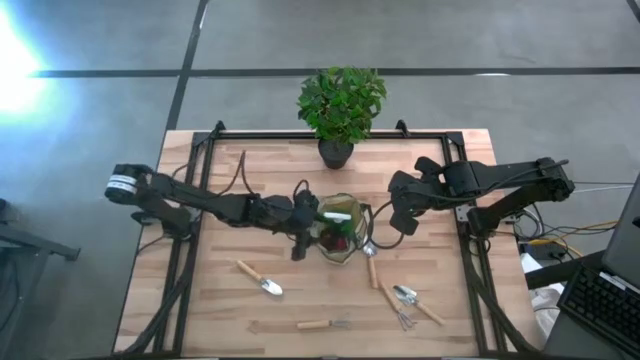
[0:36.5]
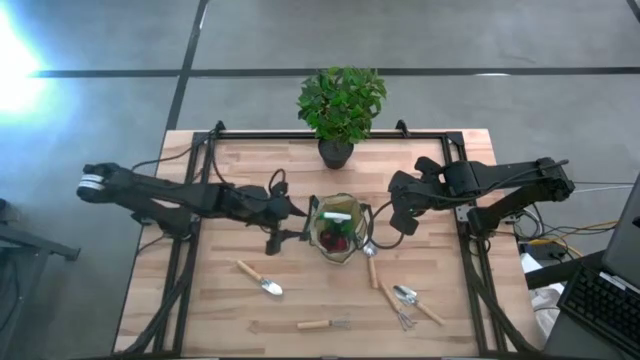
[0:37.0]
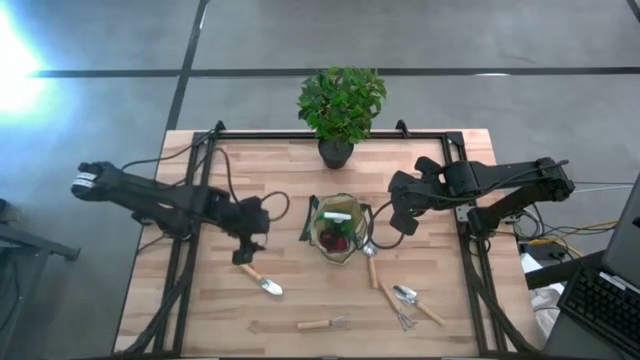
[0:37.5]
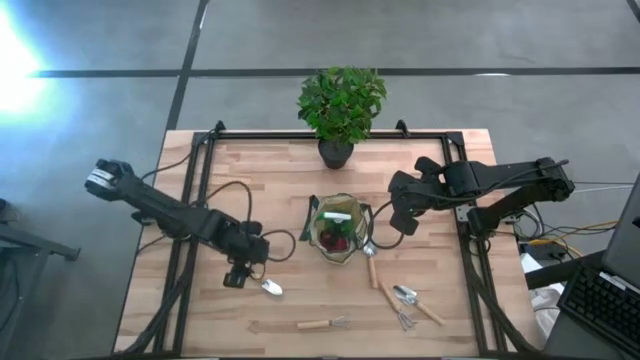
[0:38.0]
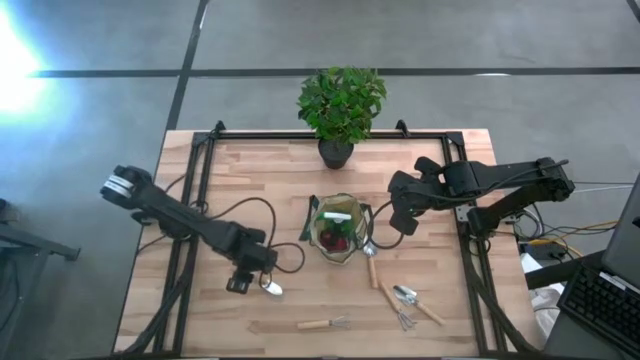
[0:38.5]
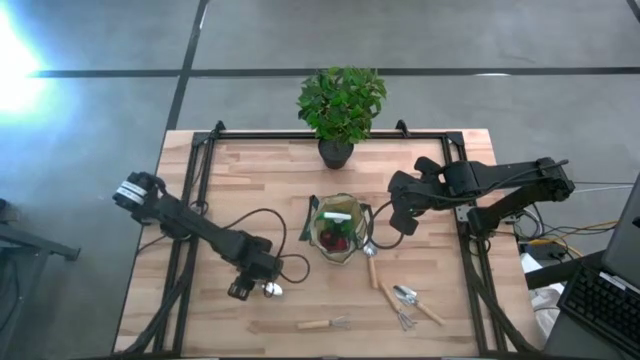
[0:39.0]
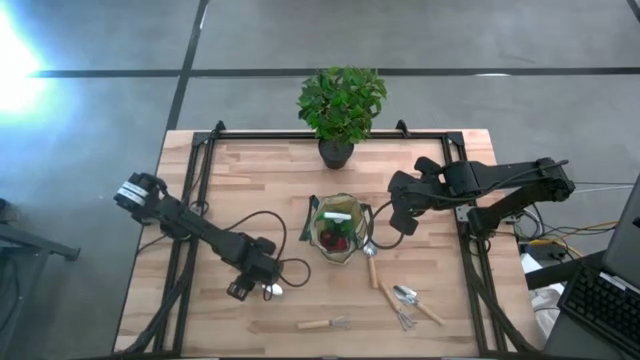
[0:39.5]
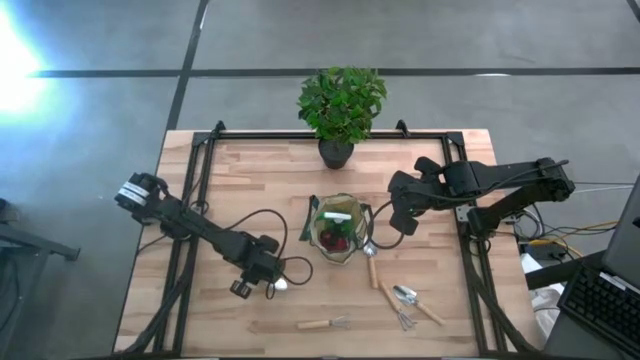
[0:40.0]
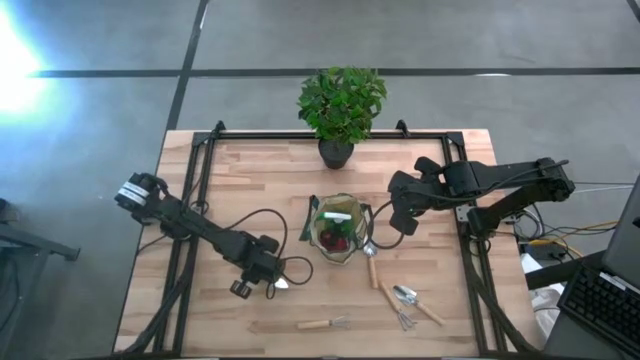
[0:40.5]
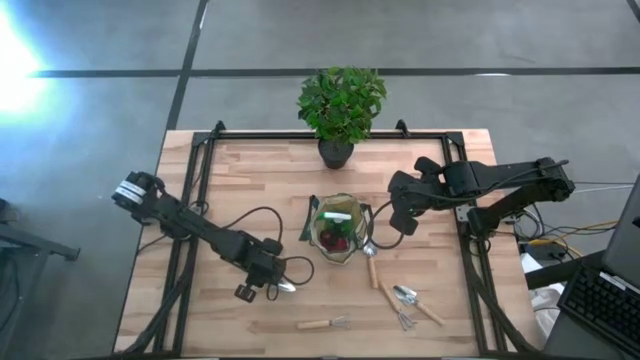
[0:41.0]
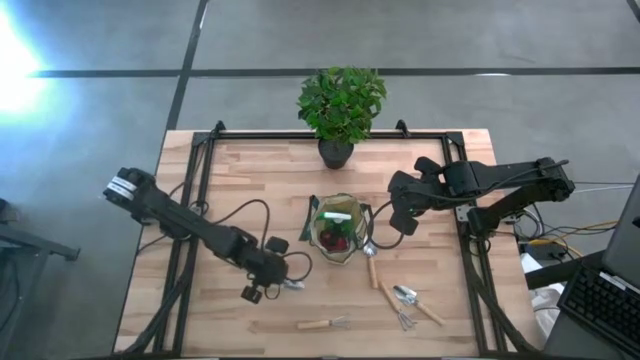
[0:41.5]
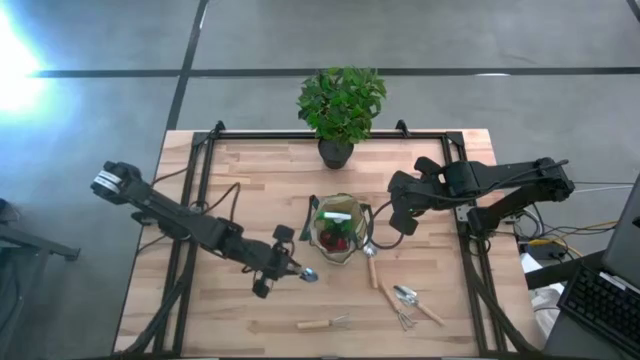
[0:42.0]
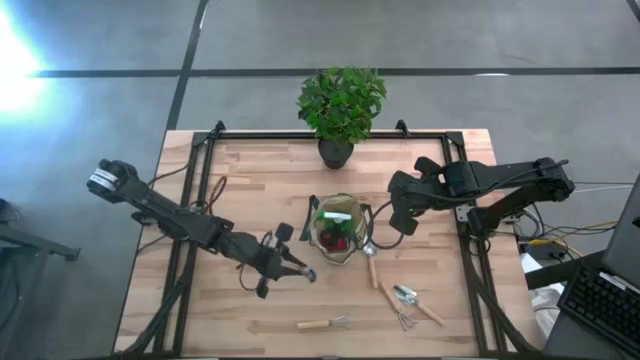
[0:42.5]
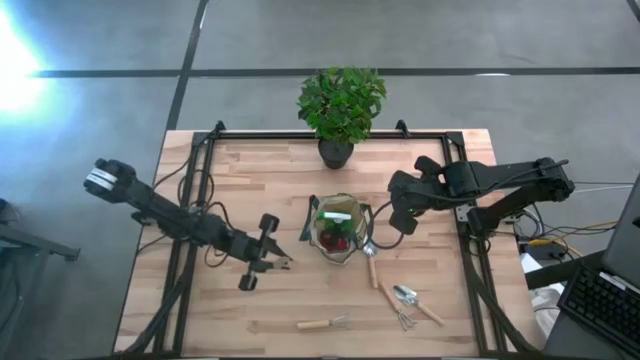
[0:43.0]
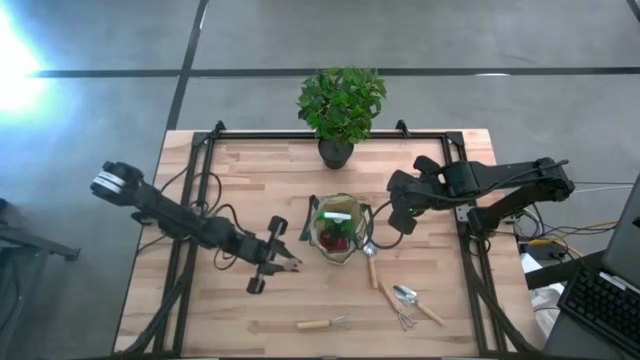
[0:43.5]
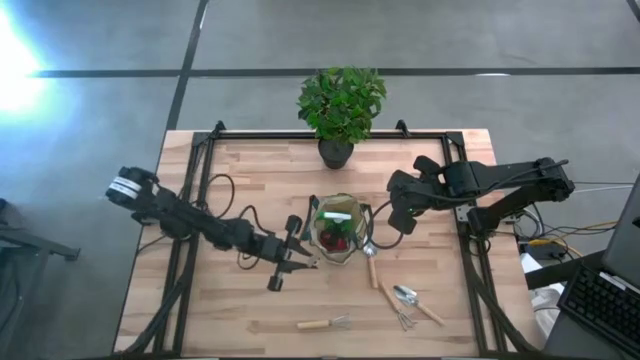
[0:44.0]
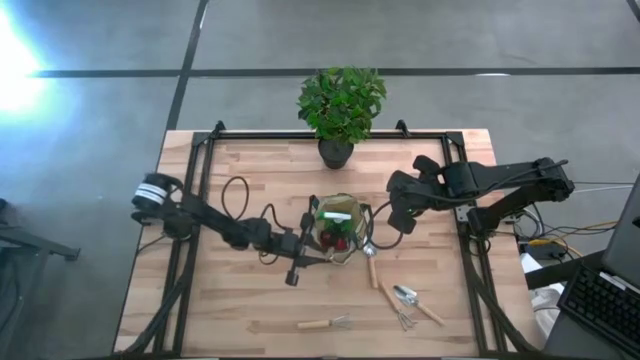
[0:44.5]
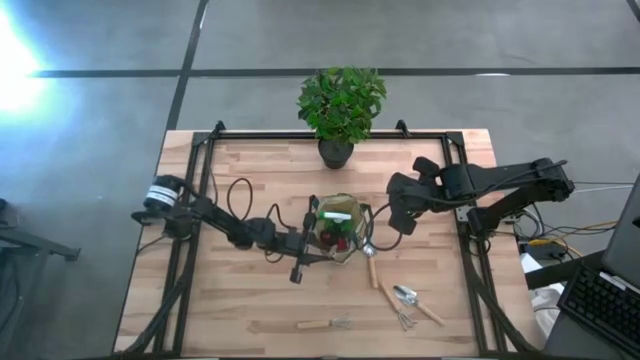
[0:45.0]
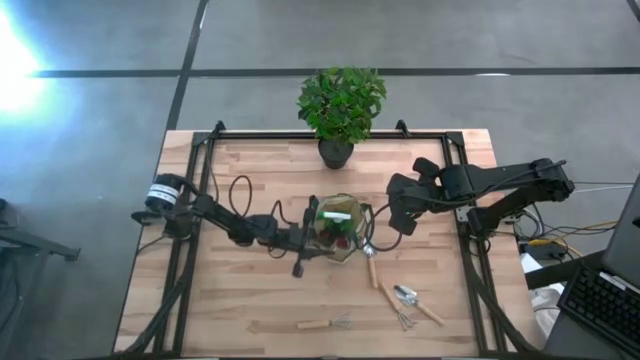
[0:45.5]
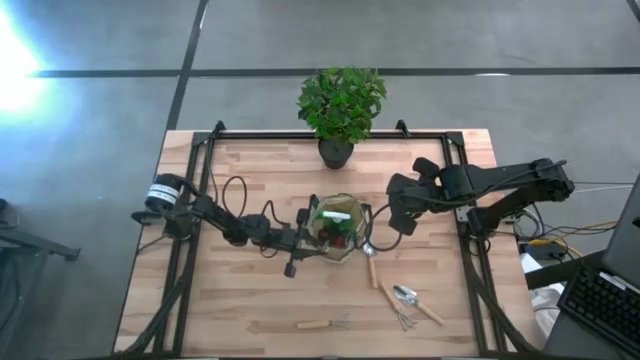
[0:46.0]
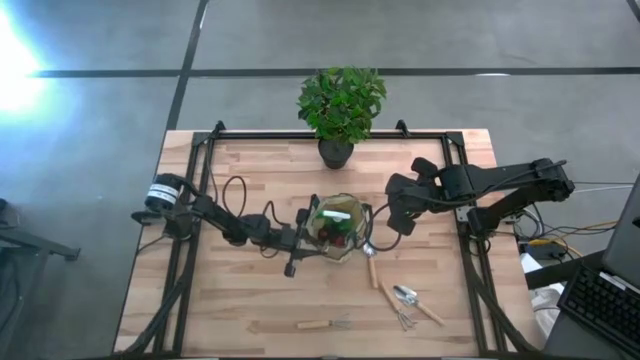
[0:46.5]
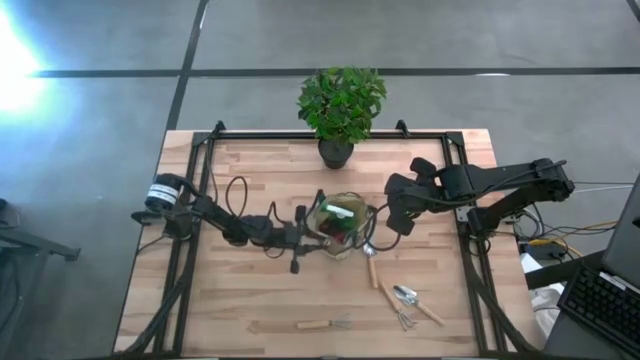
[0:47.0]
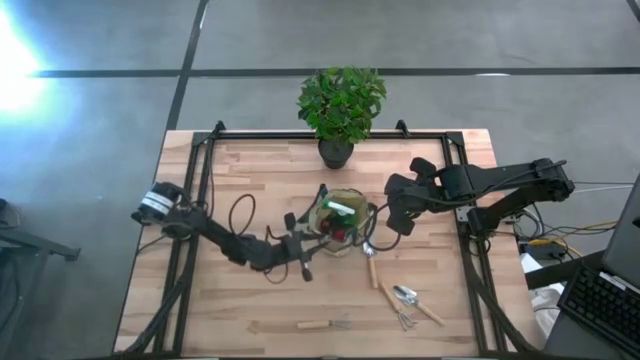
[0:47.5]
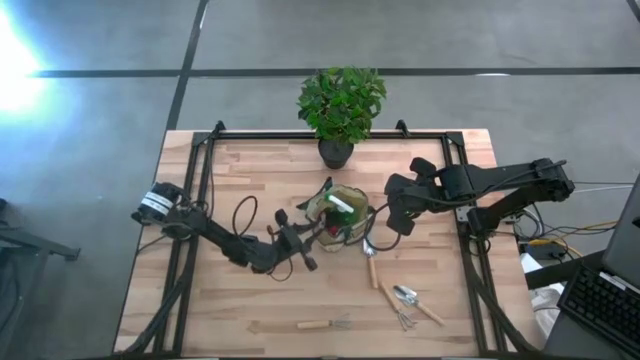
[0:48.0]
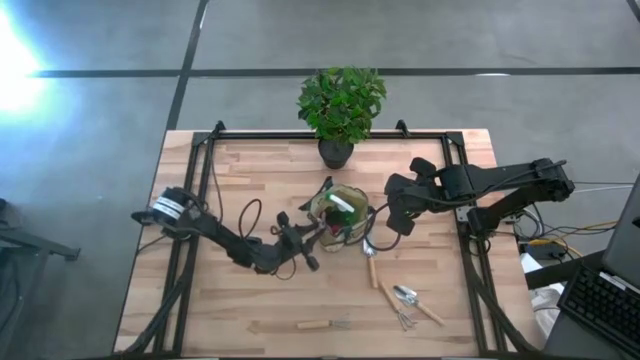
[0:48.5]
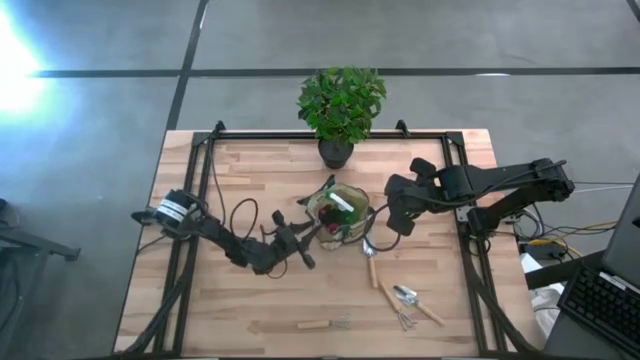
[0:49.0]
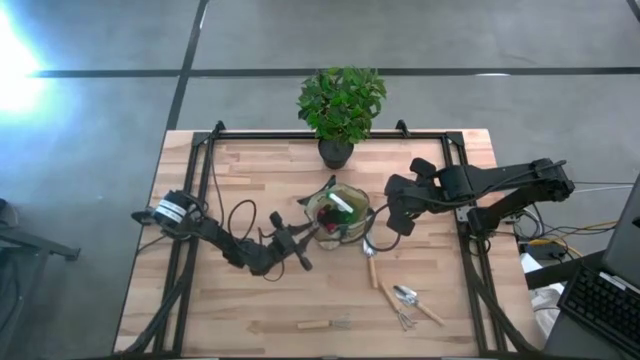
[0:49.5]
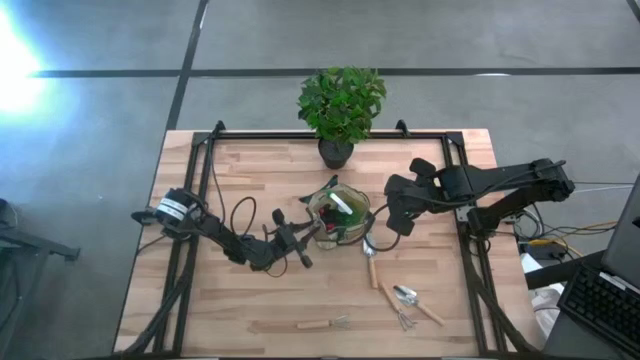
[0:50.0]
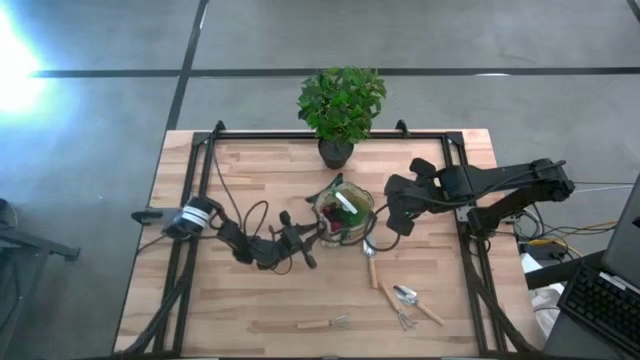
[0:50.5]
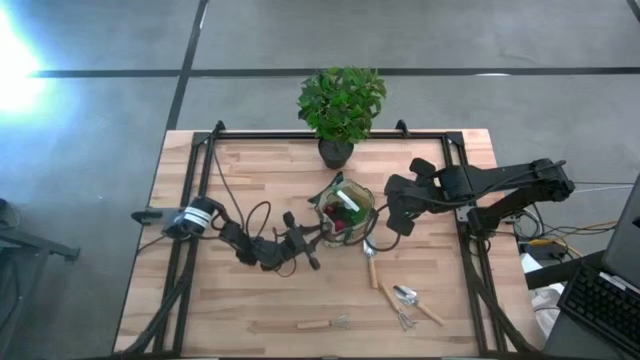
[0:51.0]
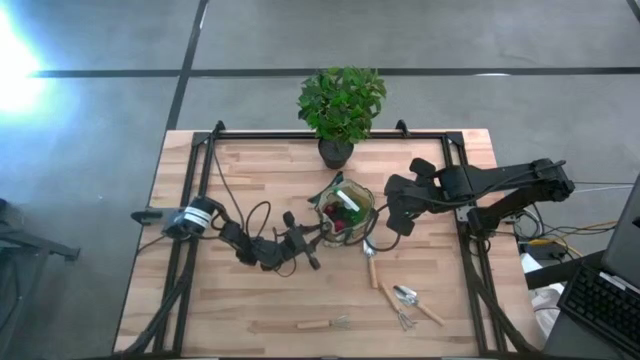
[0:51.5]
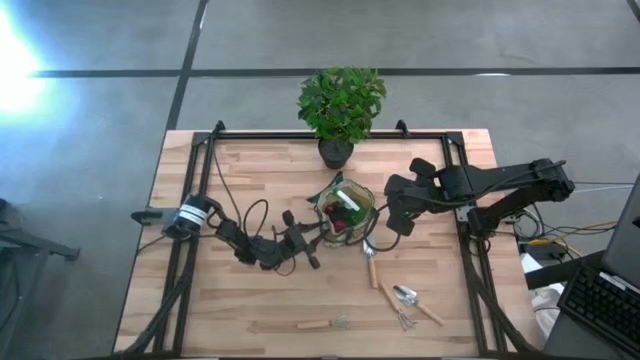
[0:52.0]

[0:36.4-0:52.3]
Task: Pick & Place Garden tools in Gardening bag
Put the left brown trowel into the side pocket of the gardening bag

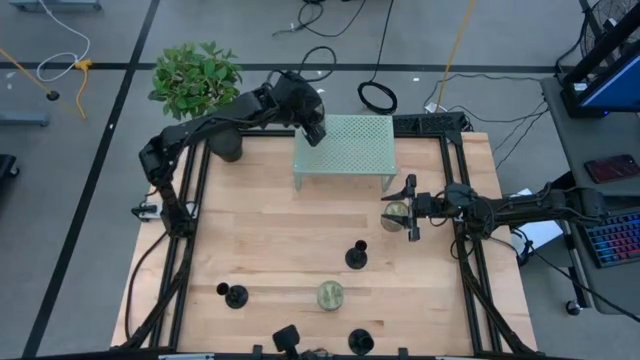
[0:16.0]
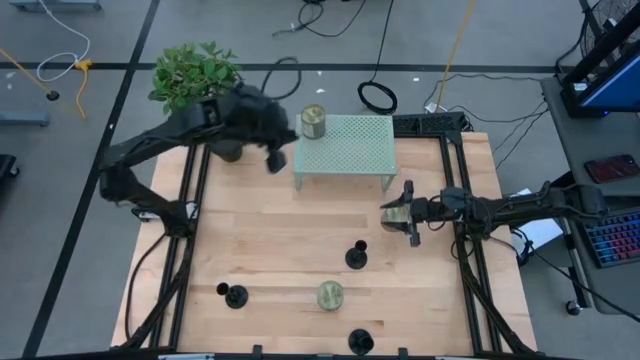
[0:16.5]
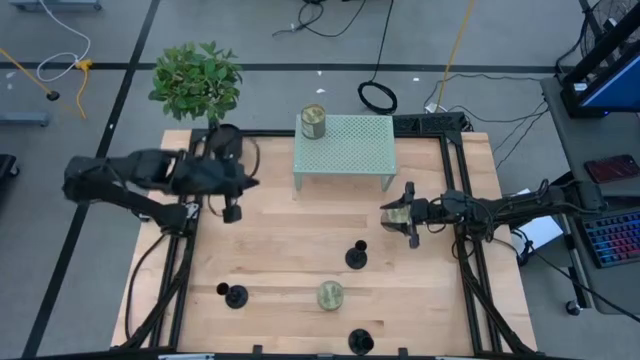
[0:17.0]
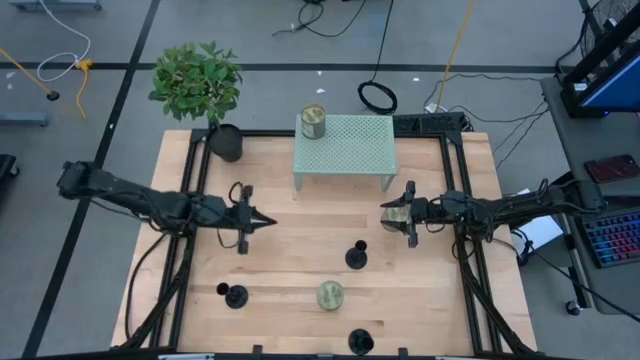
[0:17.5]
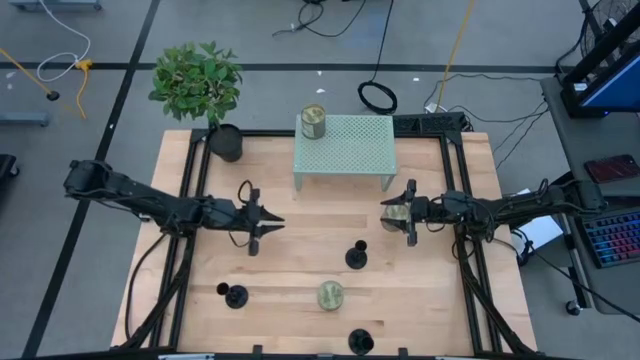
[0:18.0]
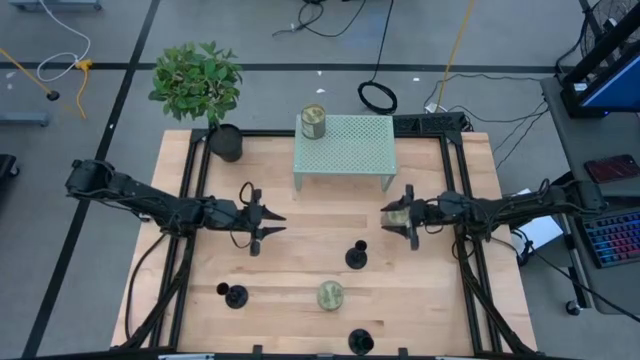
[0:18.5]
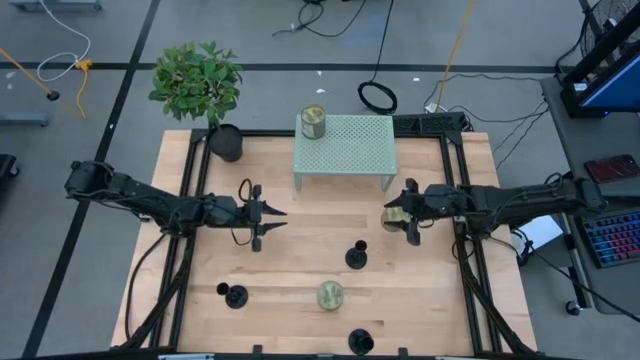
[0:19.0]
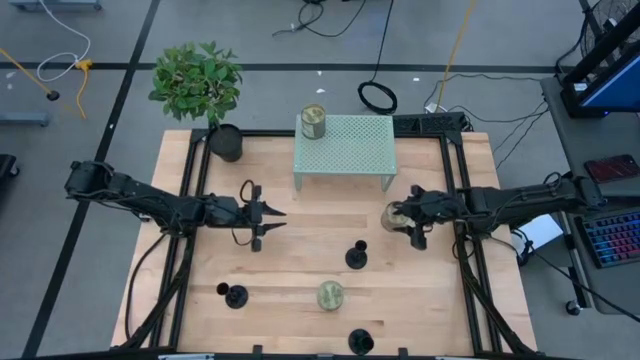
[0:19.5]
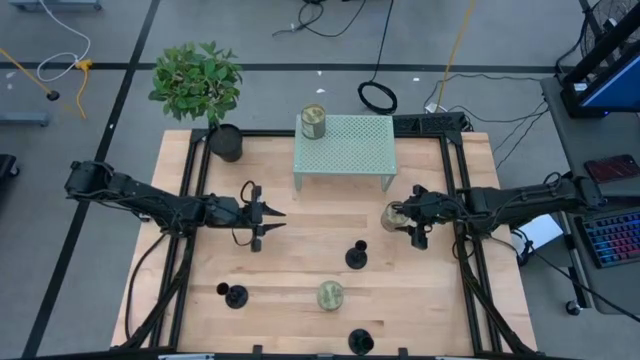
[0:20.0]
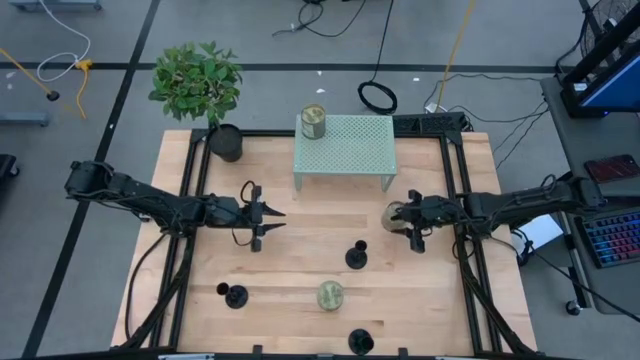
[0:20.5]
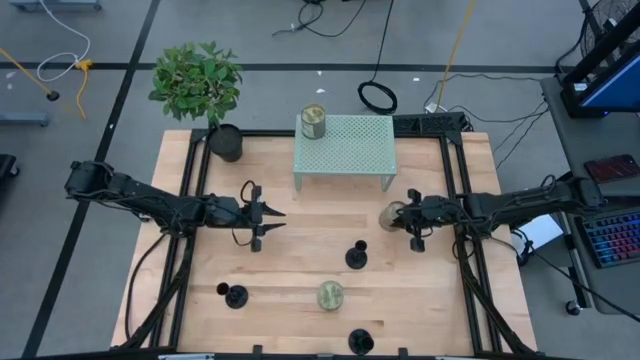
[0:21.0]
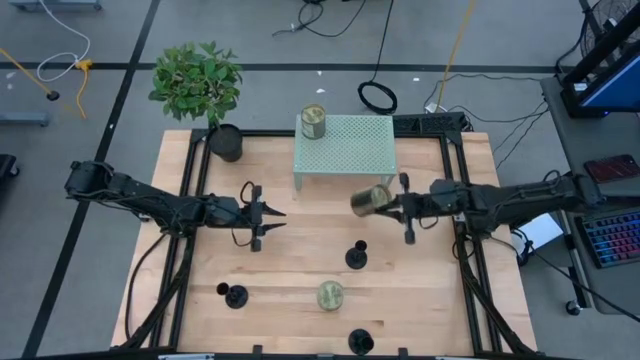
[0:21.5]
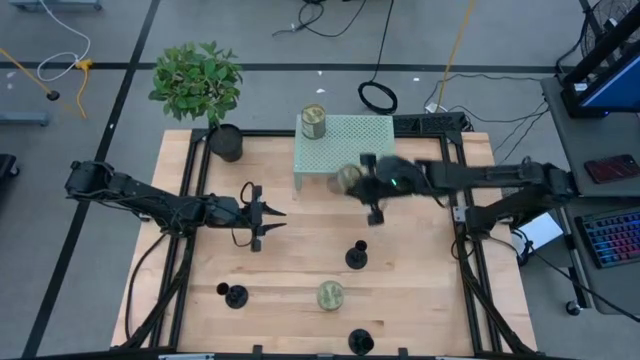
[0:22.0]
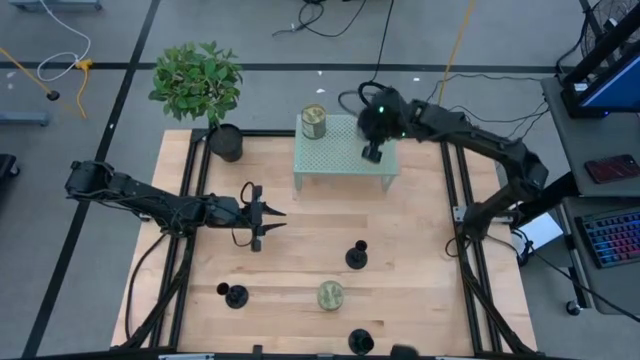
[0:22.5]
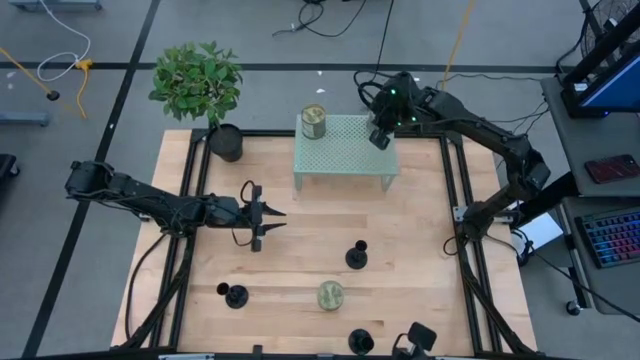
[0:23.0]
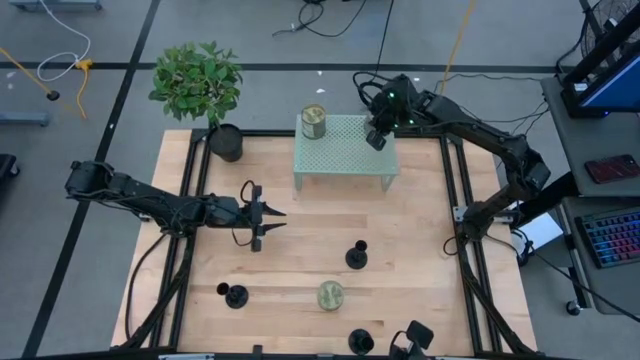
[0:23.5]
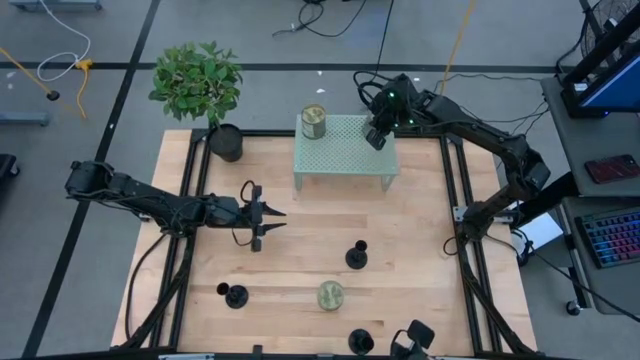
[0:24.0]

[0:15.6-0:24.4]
Task: Pick & Place candle stick holders
Put the top silver scented candle on the shelf aligned with the other silver scented candle
